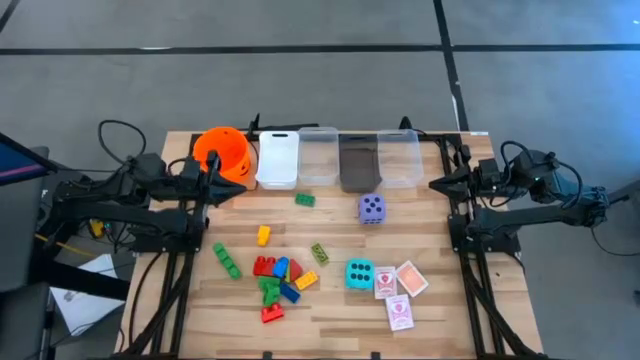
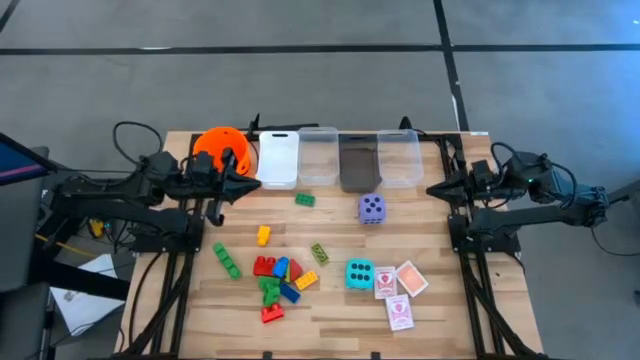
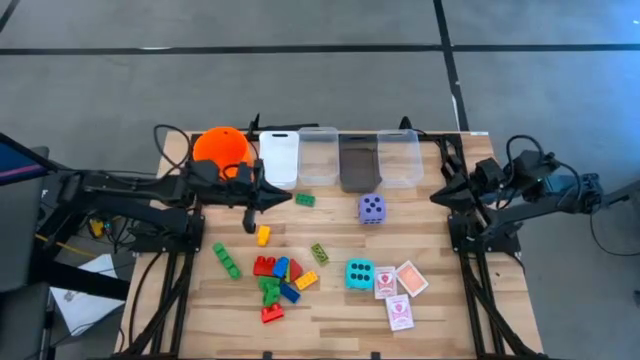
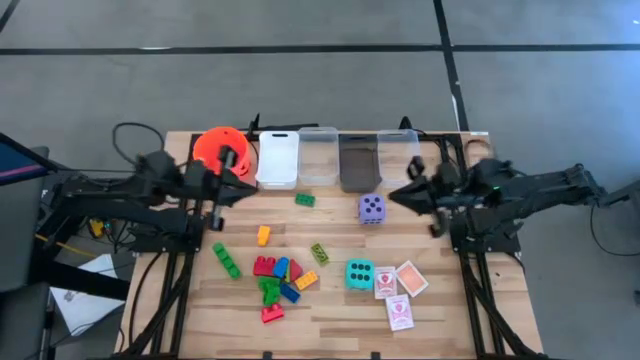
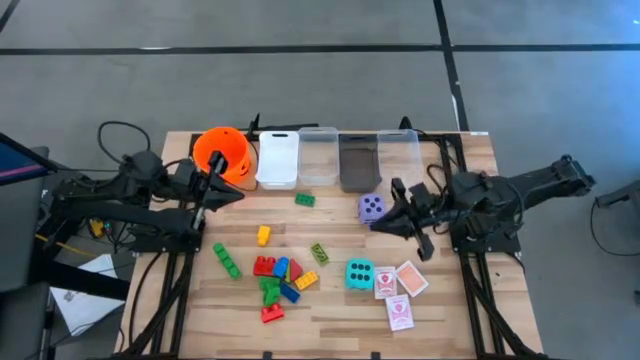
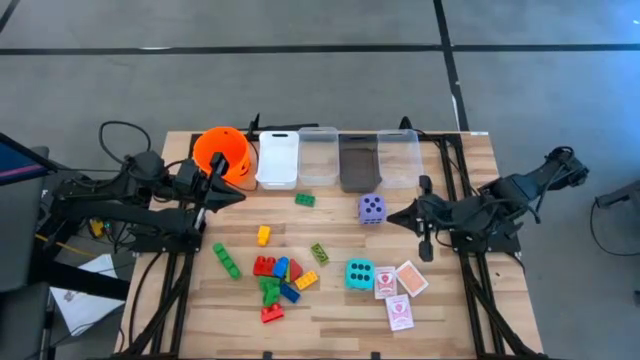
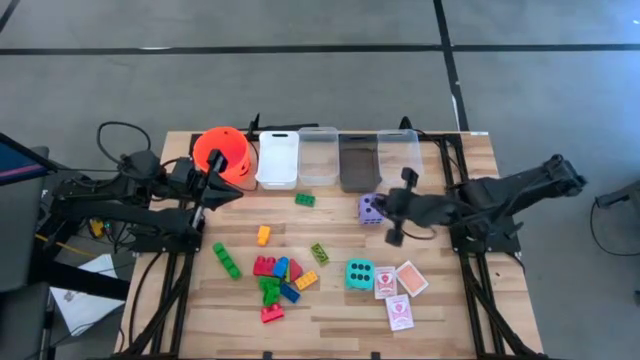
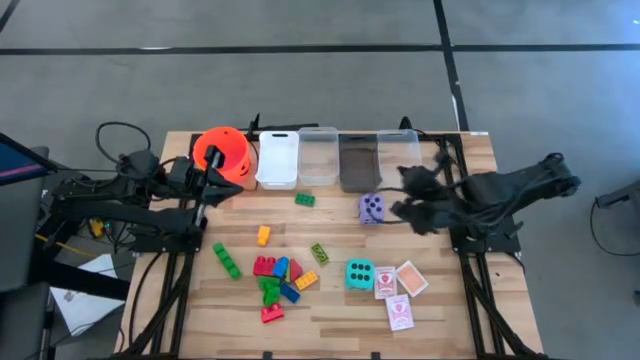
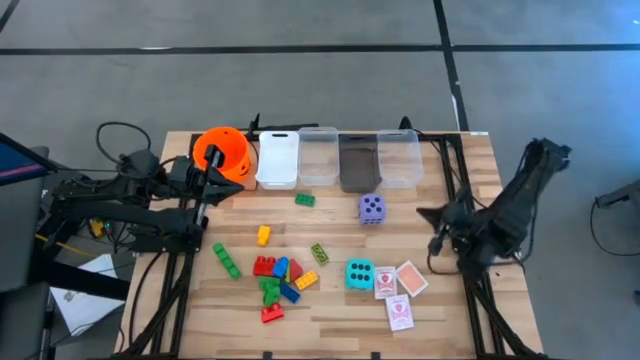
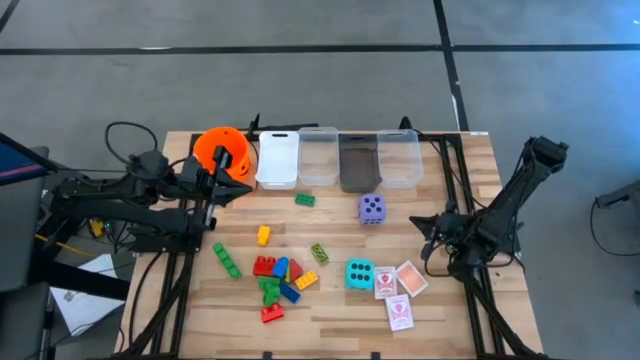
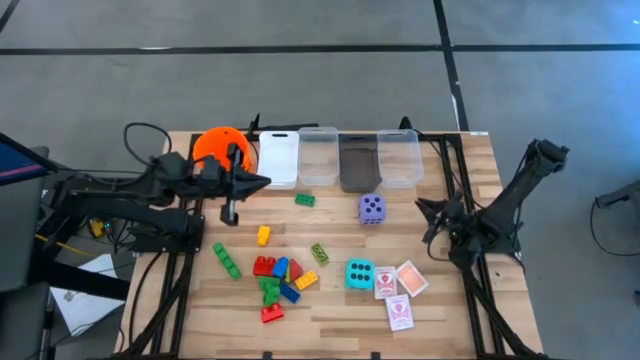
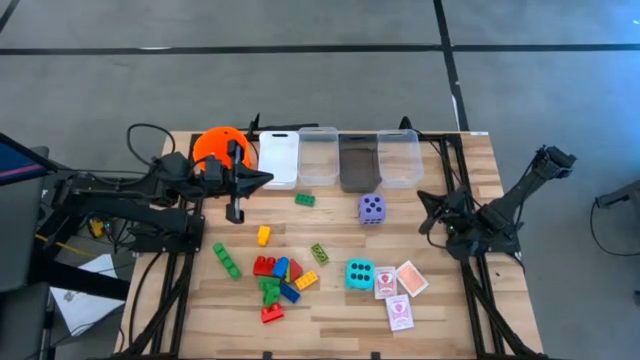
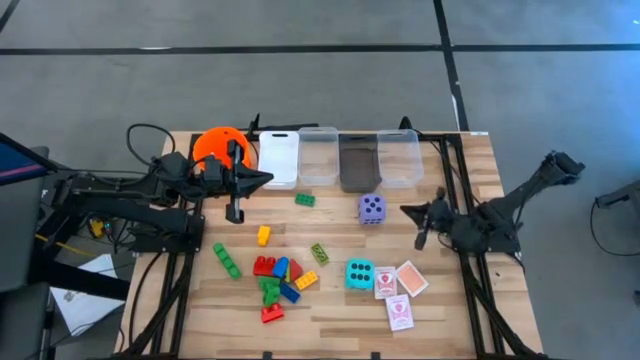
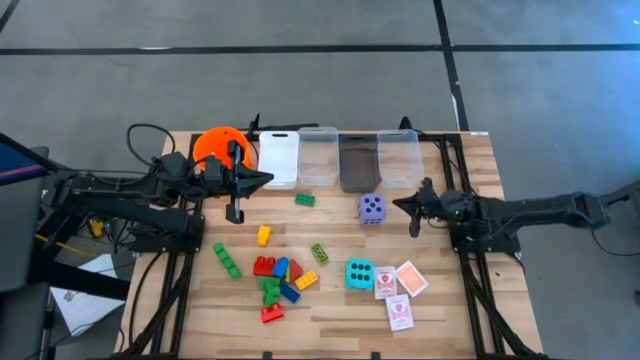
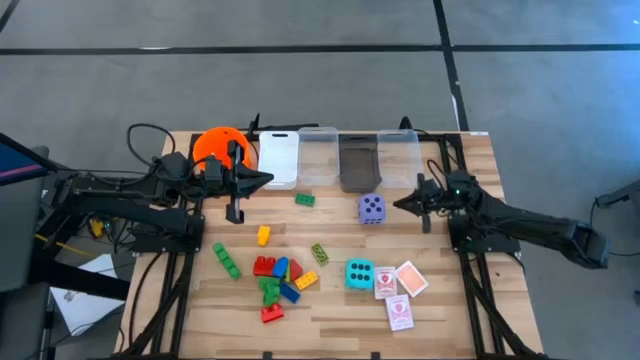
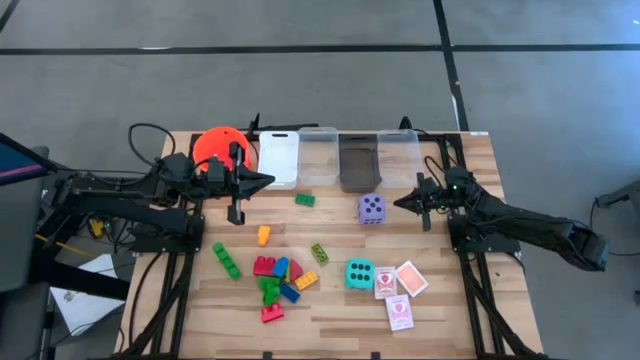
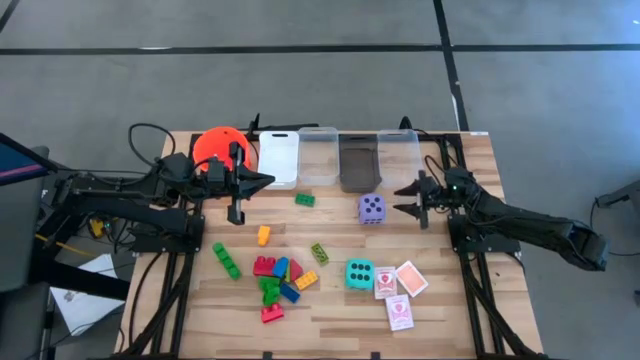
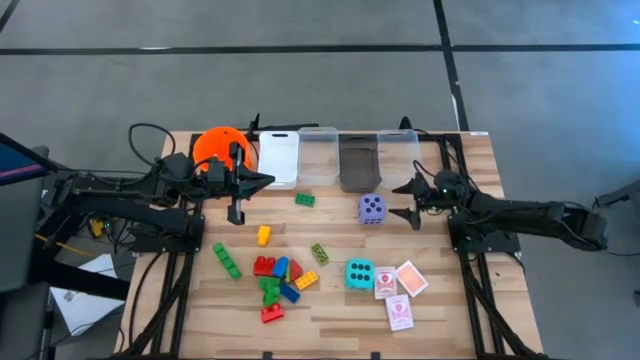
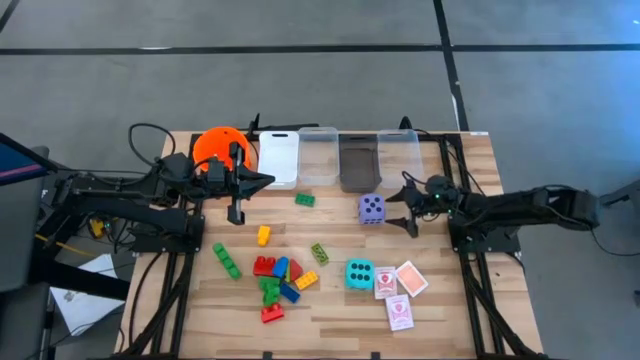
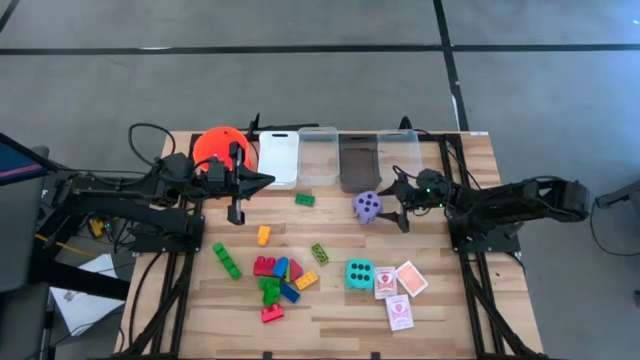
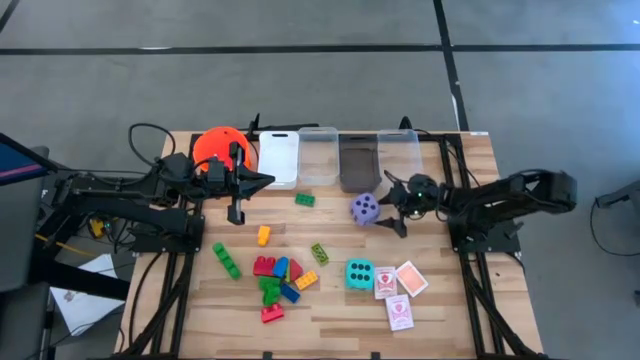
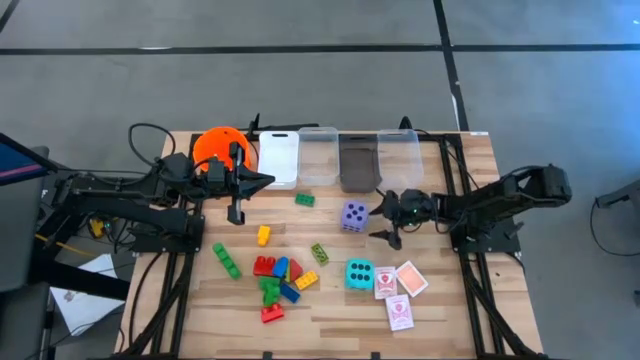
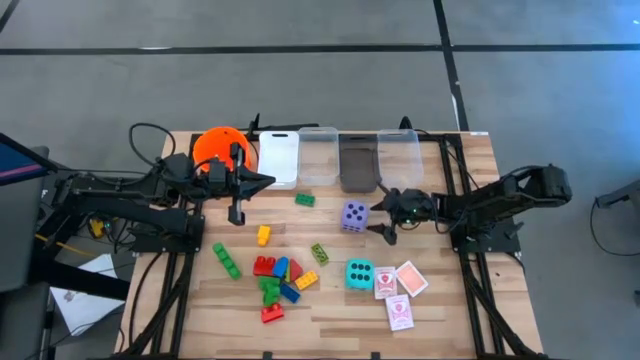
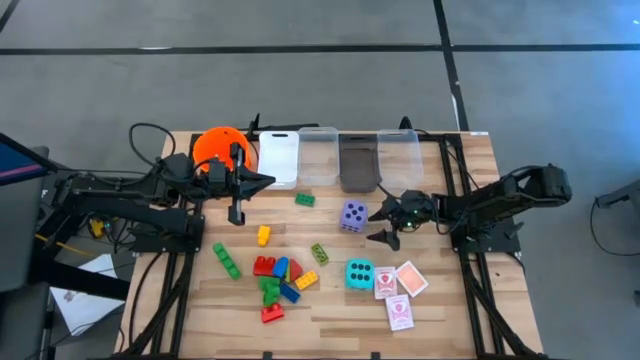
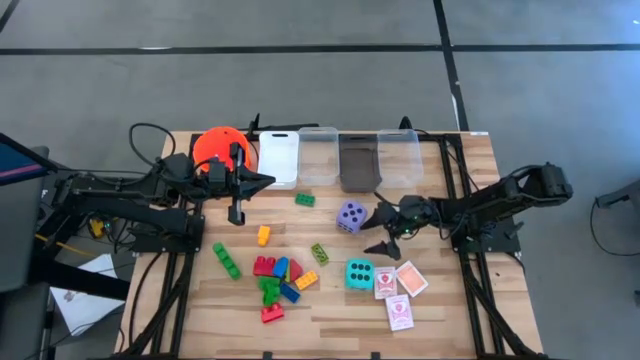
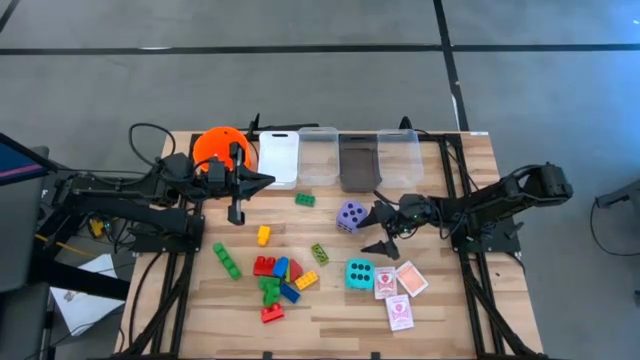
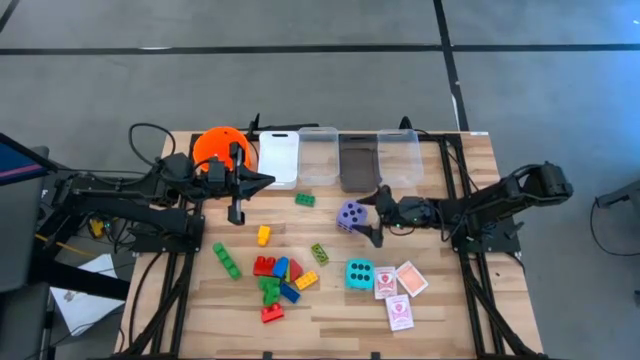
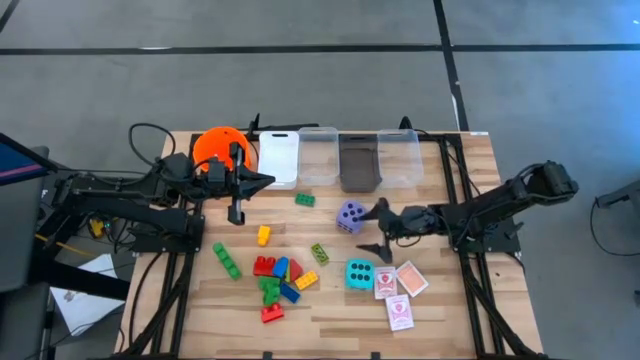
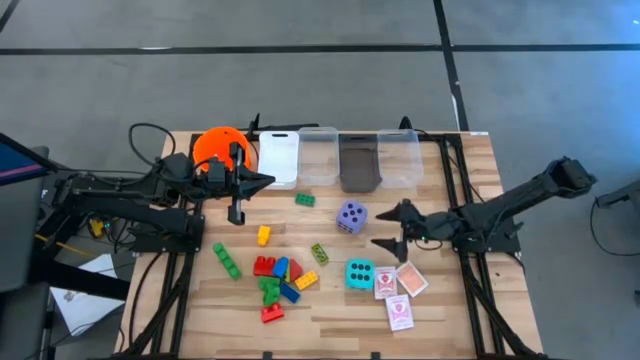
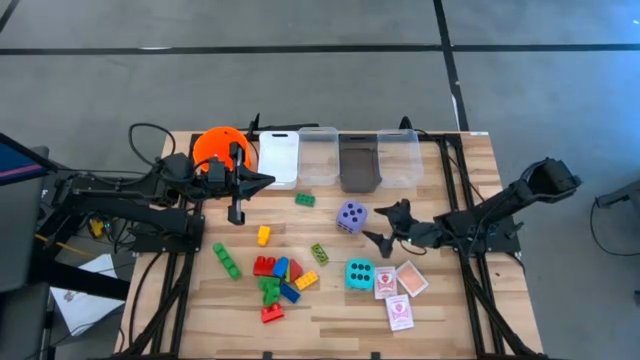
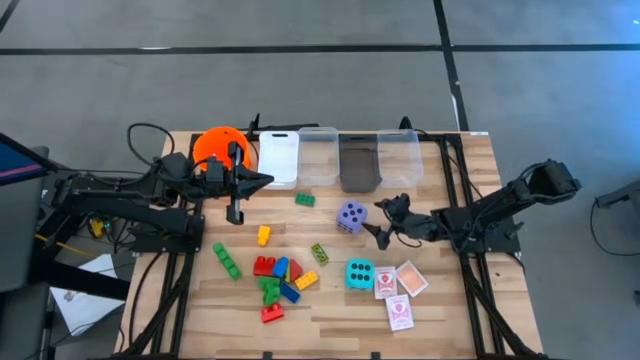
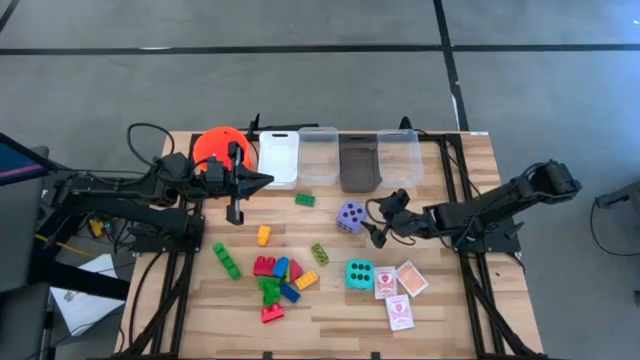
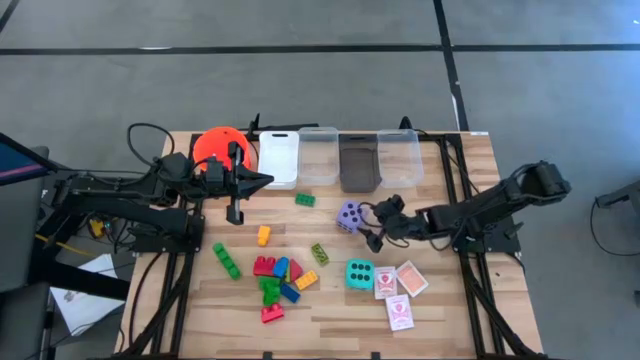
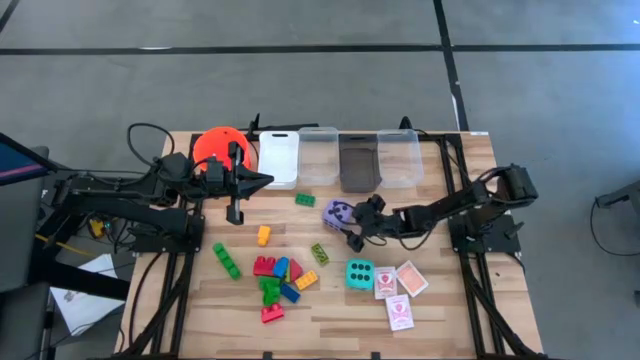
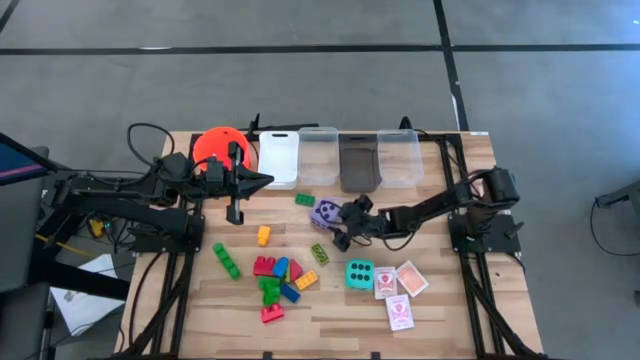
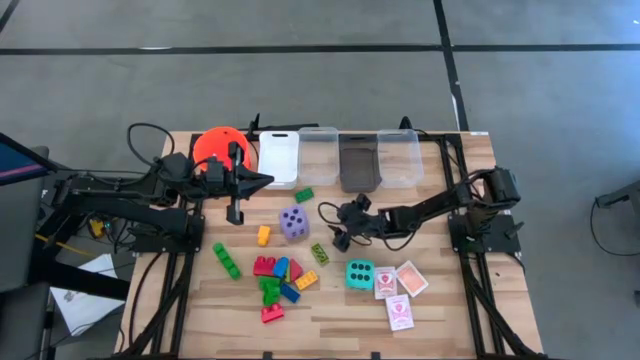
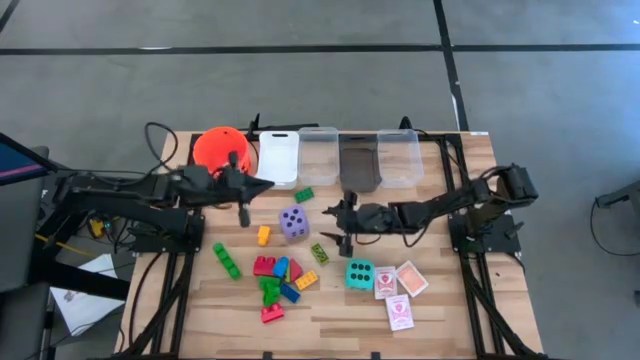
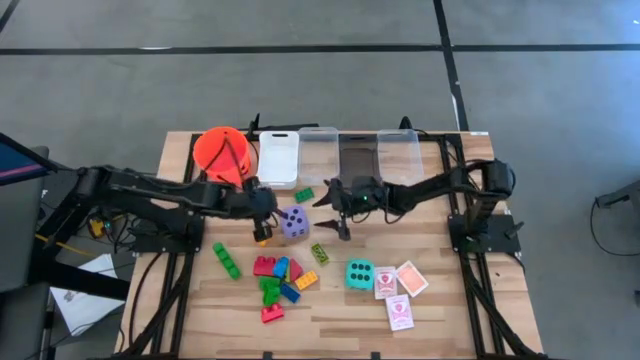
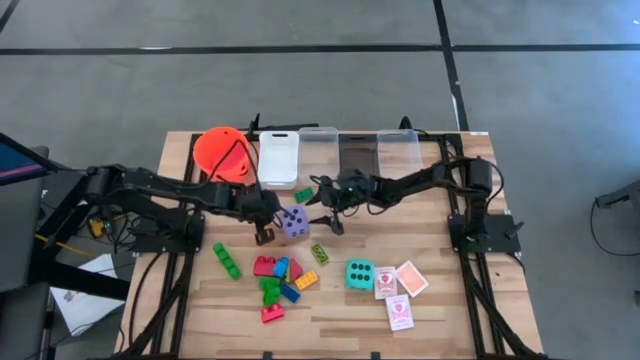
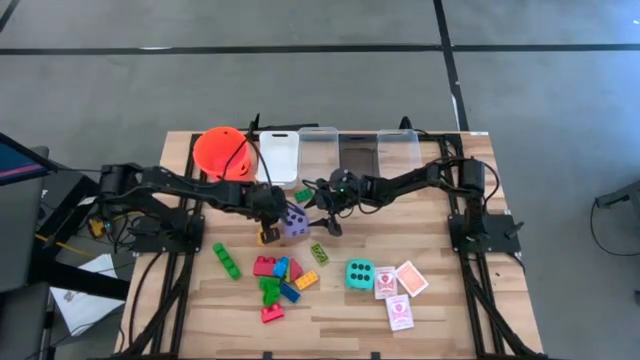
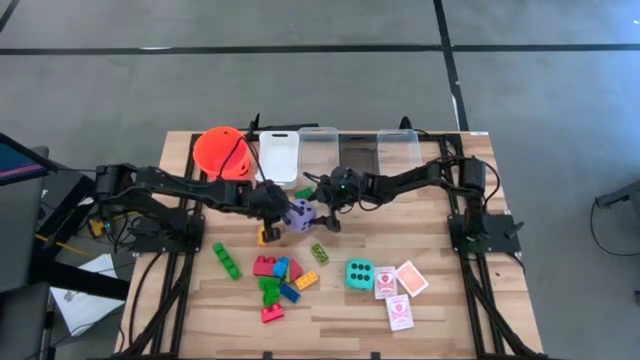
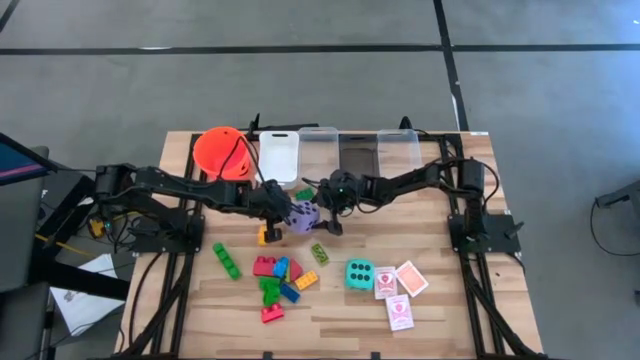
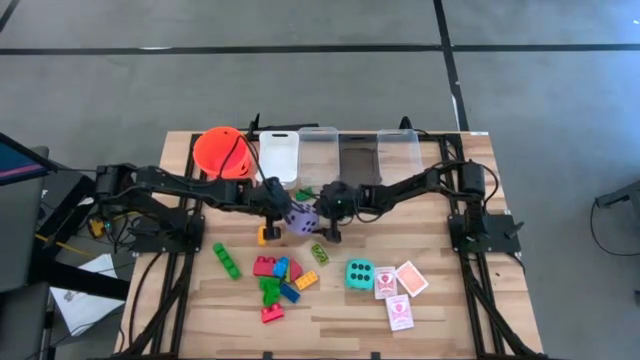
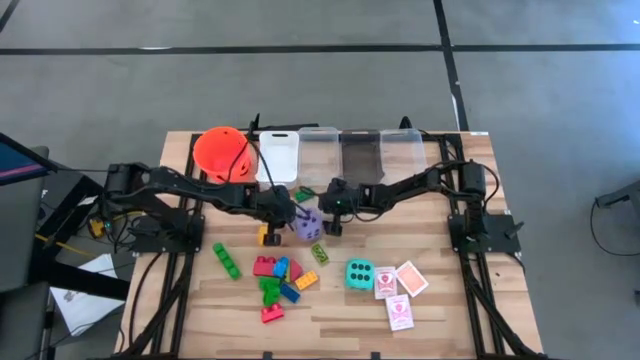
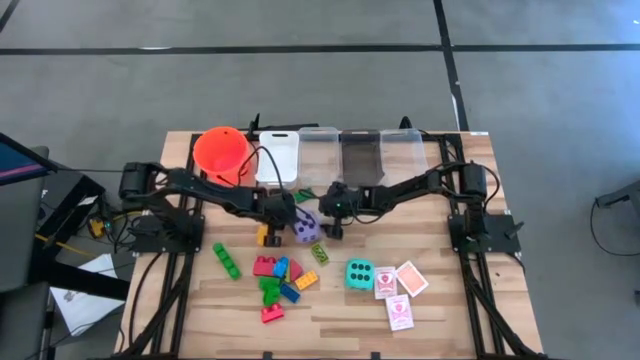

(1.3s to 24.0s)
Task: Pick & Place Toys
Put the purple dice into the left transparent bin
